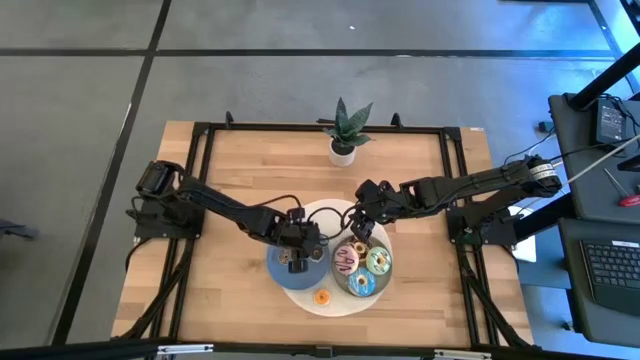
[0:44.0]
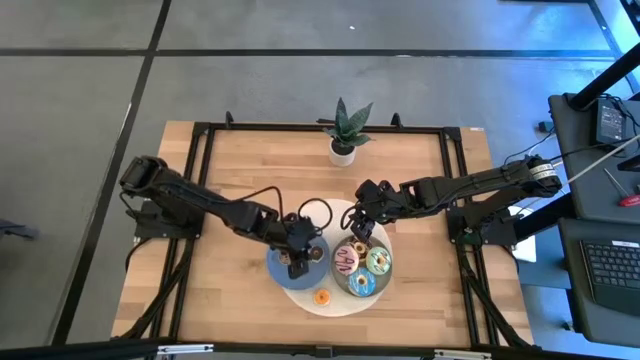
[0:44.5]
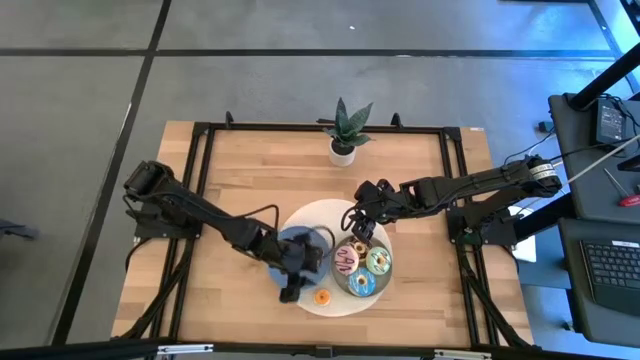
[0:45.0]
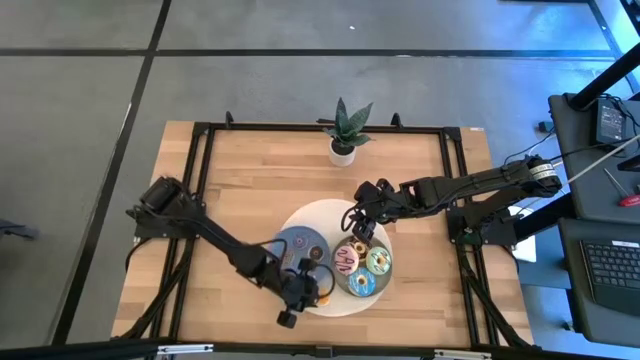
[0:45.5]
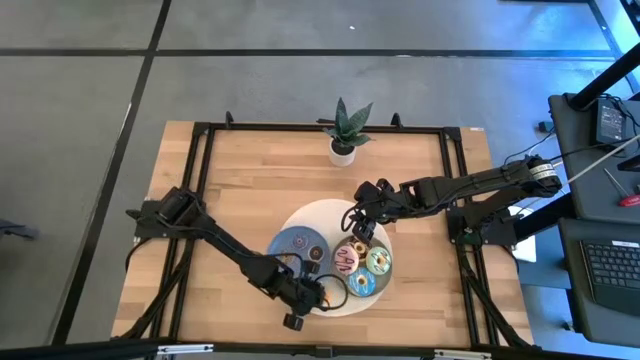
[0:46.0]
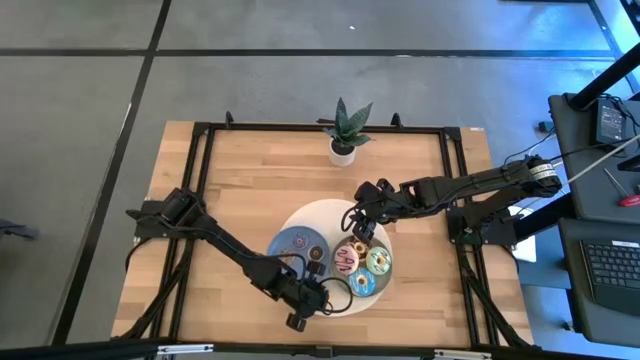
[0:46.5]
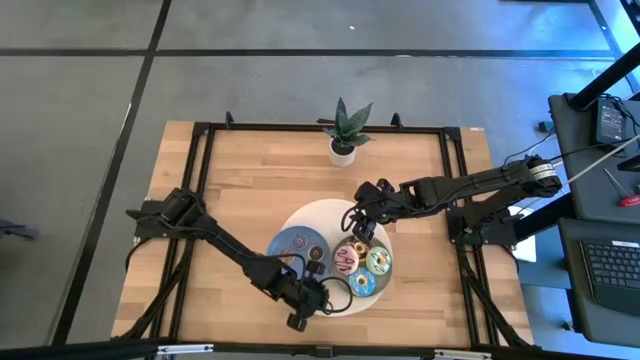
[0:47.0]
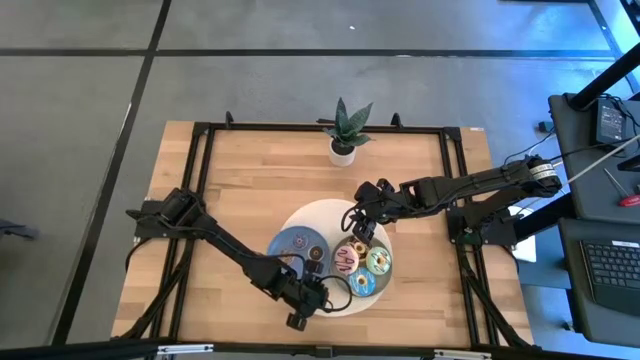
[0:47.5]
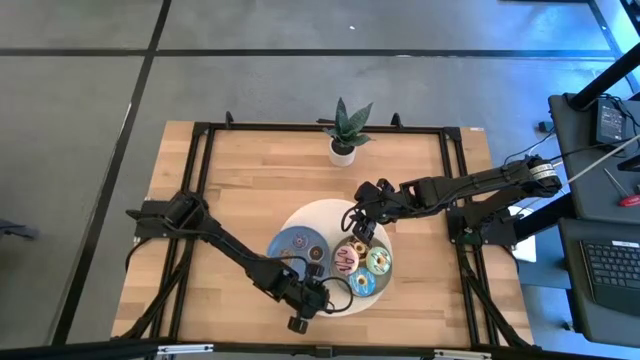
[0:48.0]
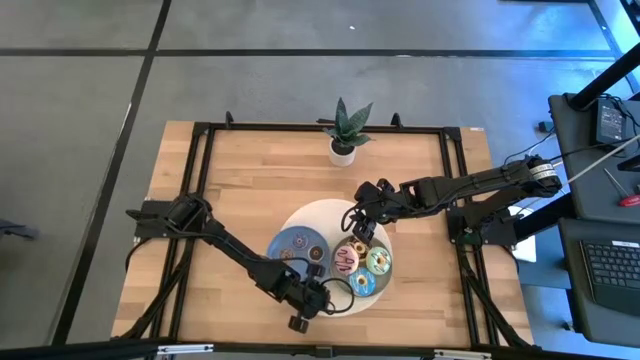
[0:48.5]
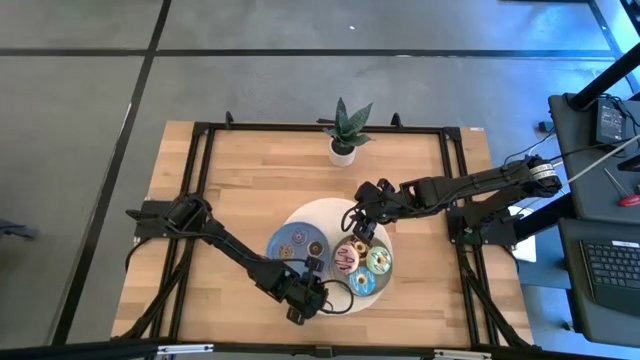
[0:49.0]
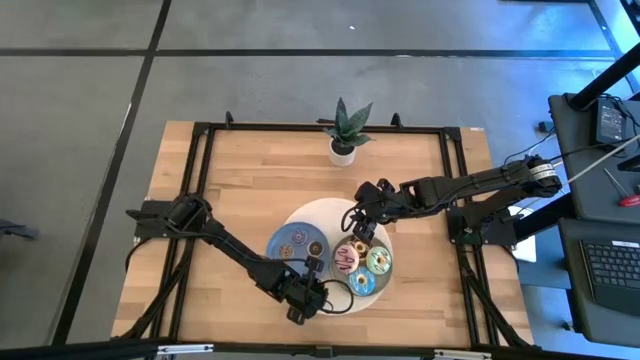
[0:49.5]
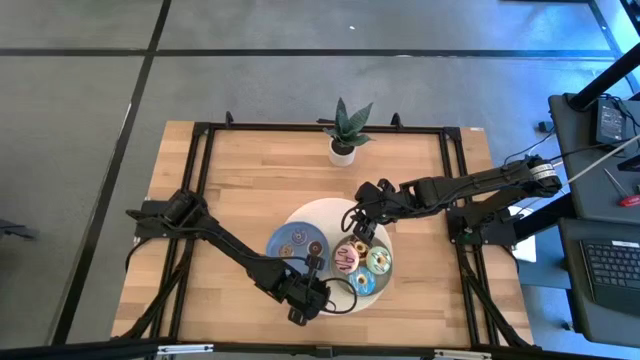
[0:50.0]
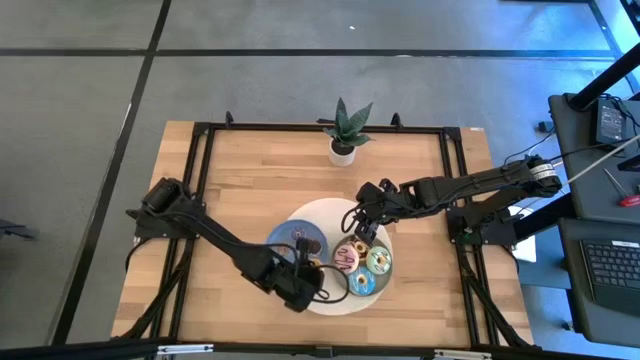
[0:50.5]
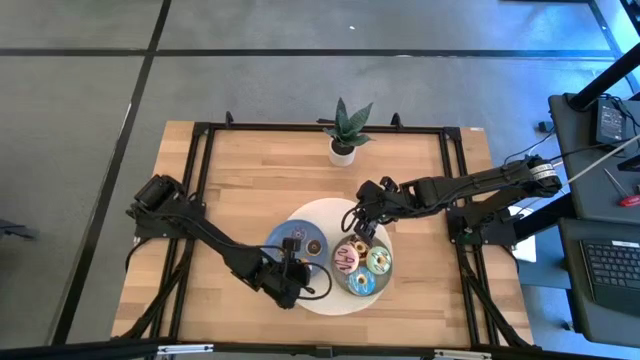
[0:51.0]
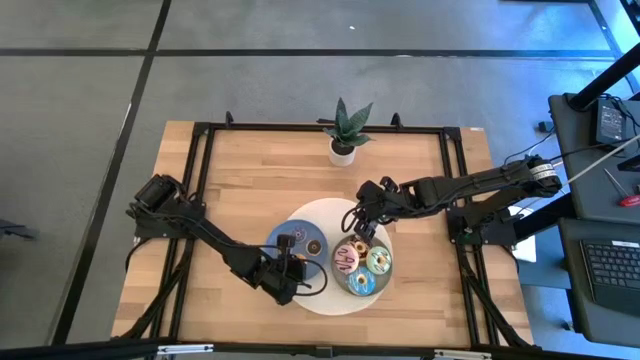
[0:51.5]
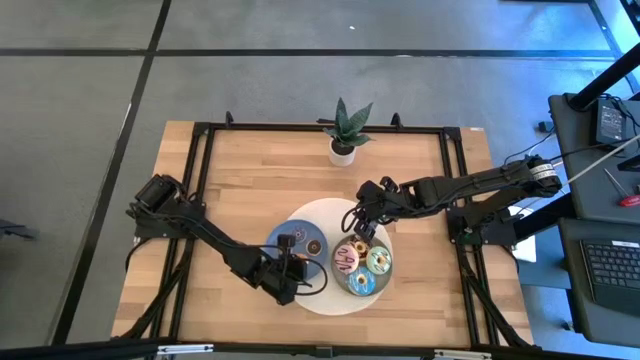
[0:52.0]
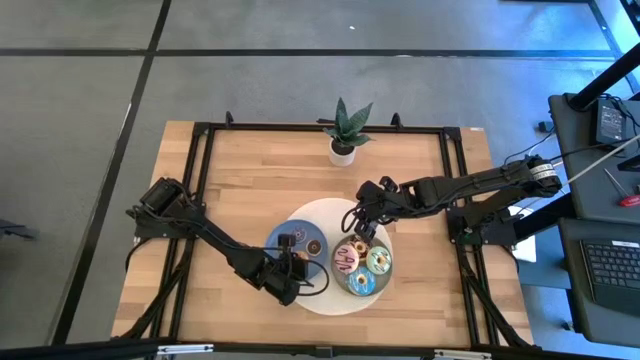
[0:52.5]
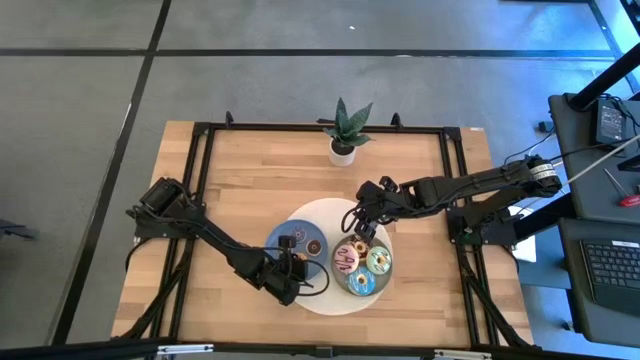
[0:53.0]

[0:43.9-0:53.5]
Task: Pick & Place donuts
Put the small orange donut on the blue plate

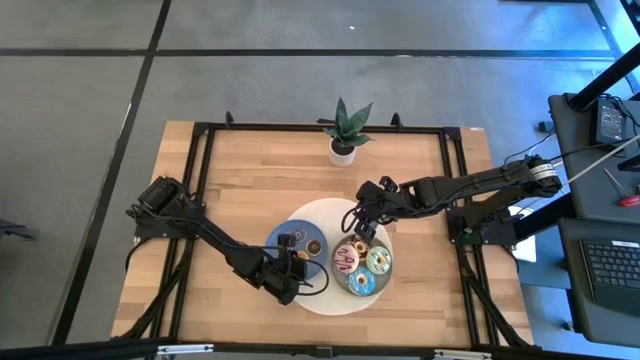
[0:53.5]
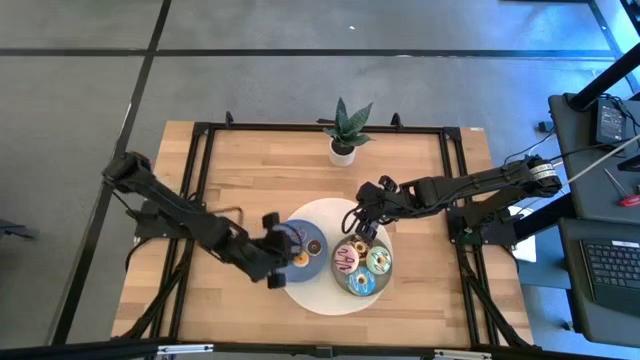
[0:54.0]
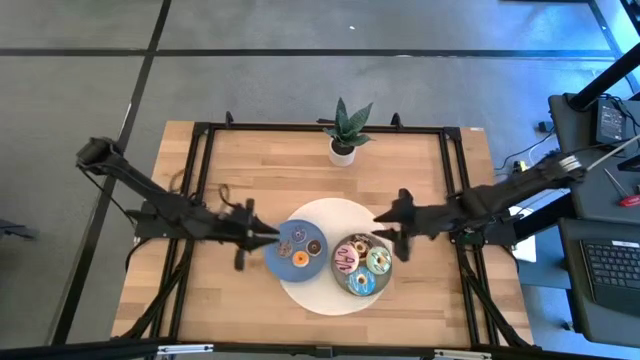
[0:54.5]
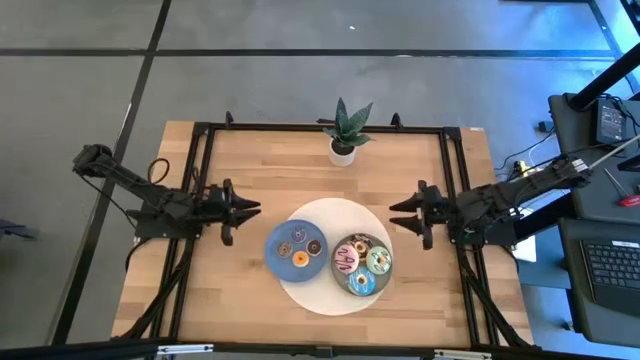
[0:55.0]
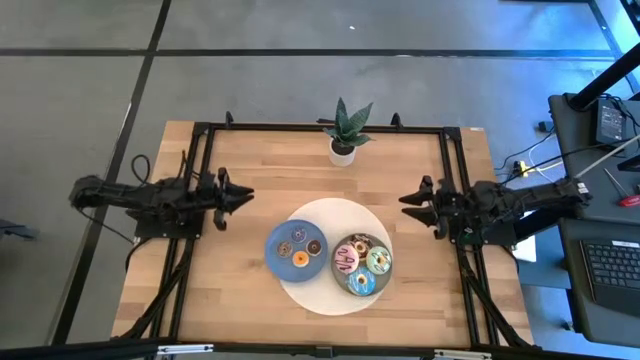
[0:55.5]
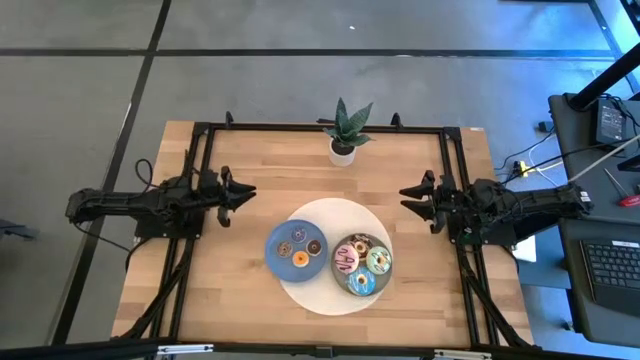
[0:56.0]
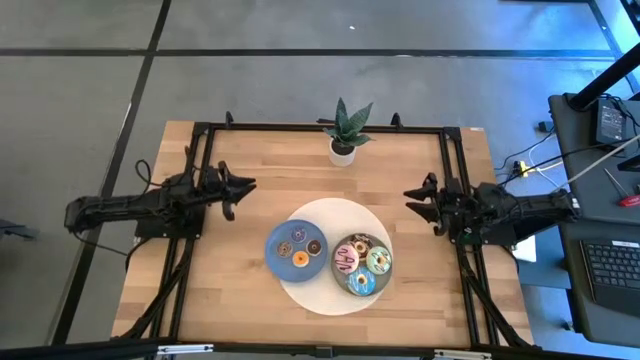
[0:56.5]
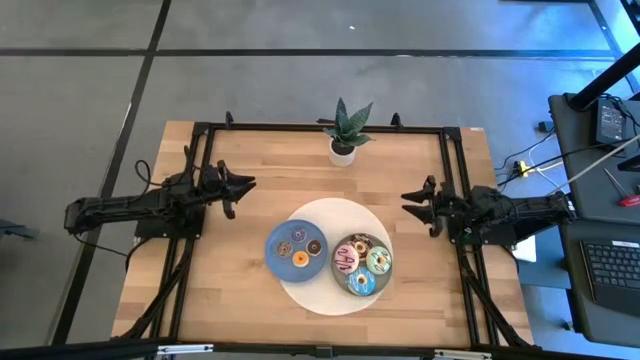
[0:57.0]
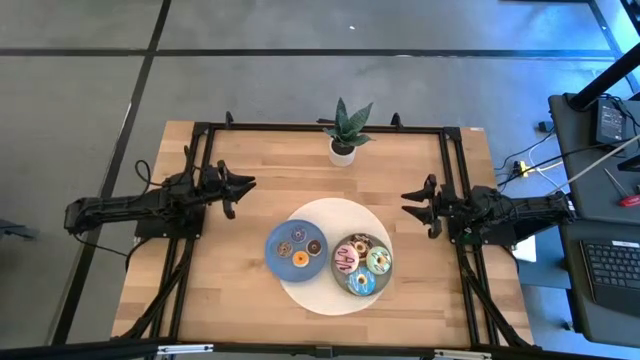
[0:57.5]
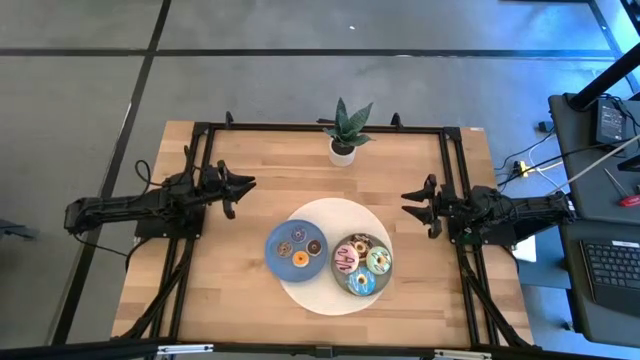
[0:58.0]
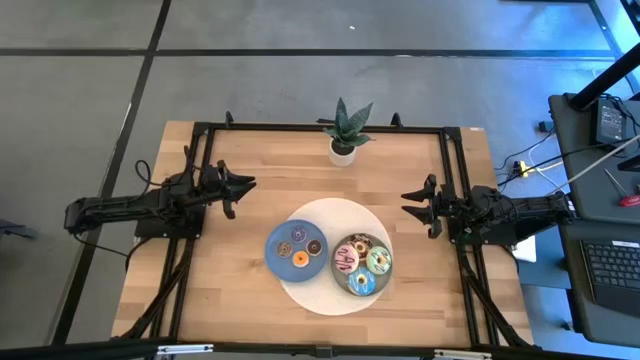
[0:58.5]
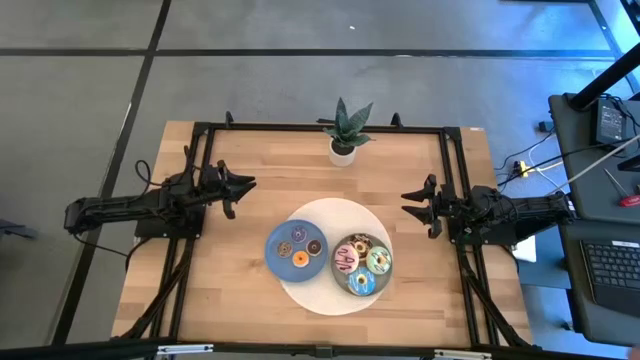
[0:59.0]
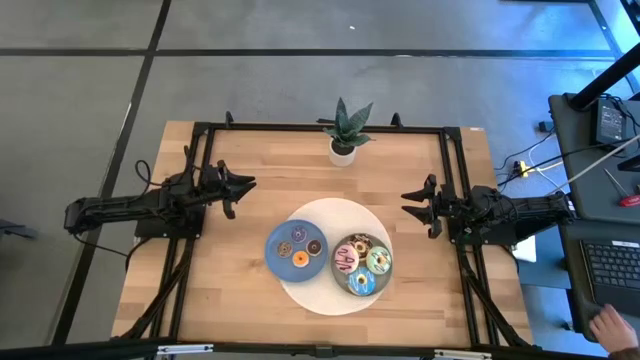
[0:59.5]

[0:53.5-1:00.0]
Return to Home Position

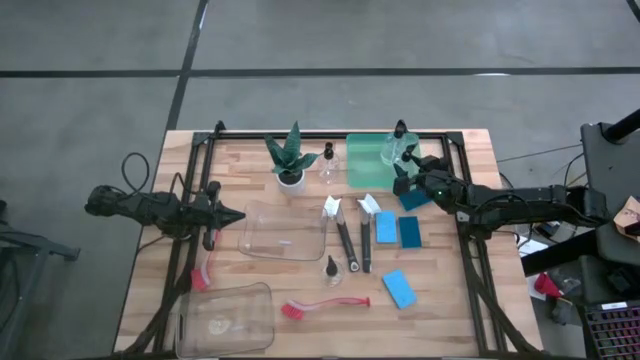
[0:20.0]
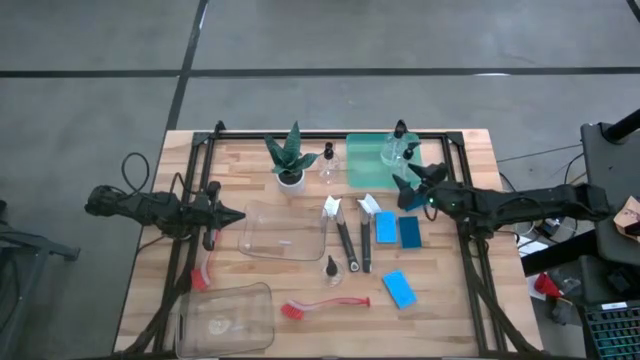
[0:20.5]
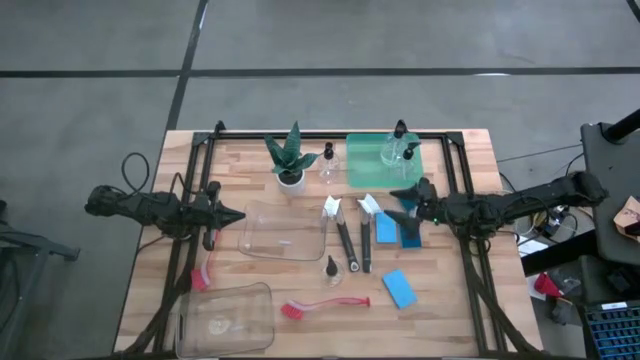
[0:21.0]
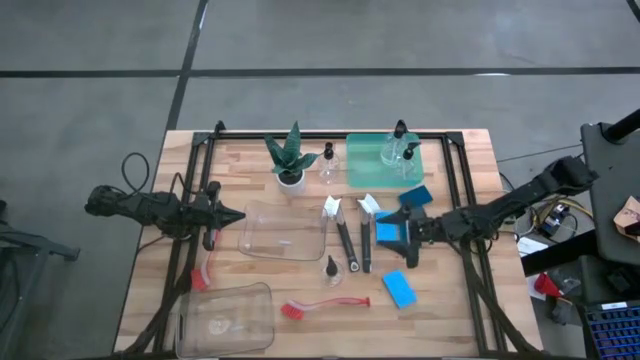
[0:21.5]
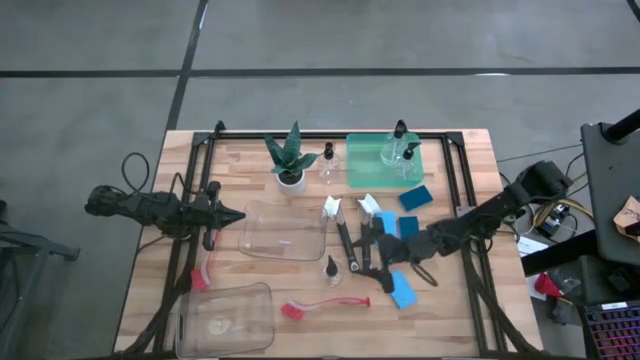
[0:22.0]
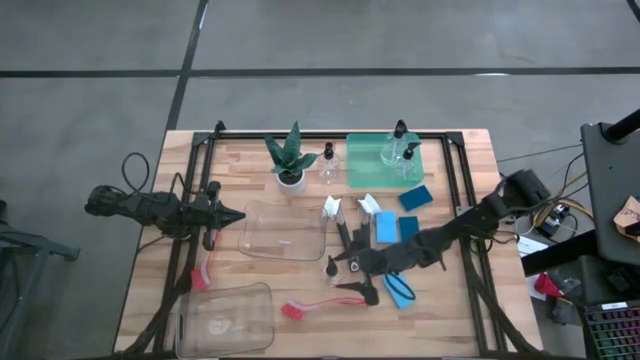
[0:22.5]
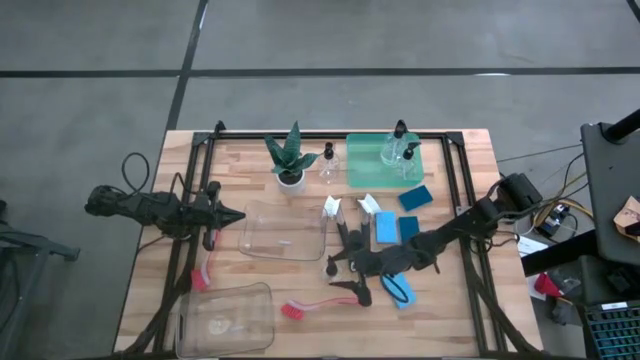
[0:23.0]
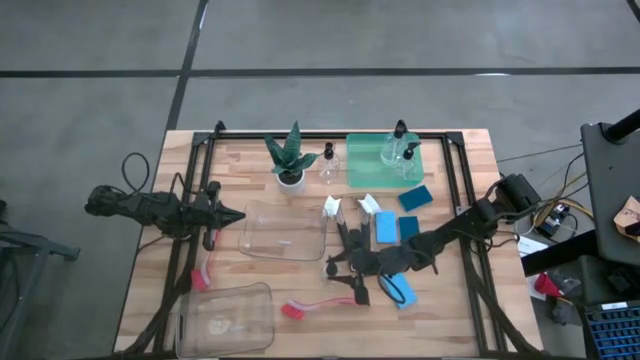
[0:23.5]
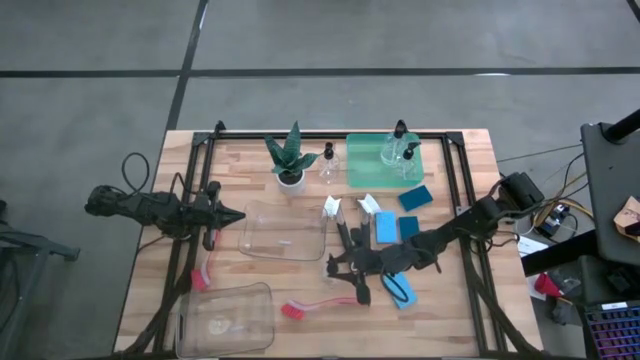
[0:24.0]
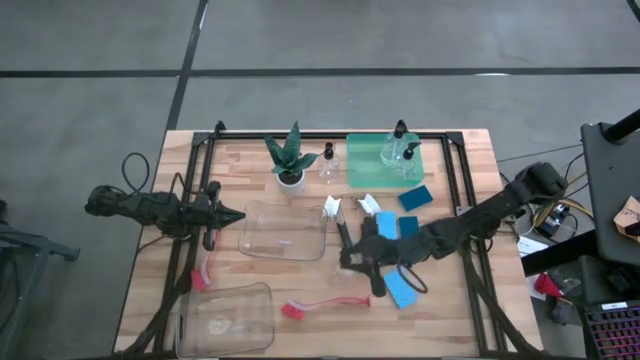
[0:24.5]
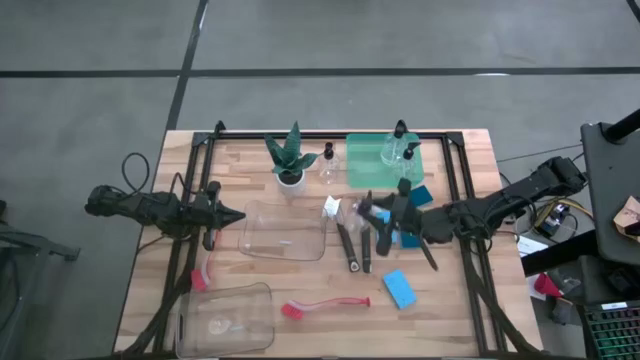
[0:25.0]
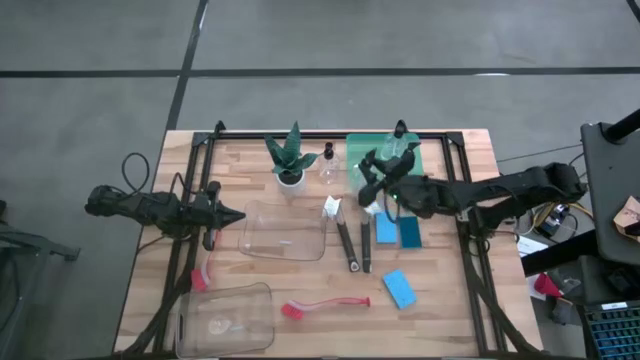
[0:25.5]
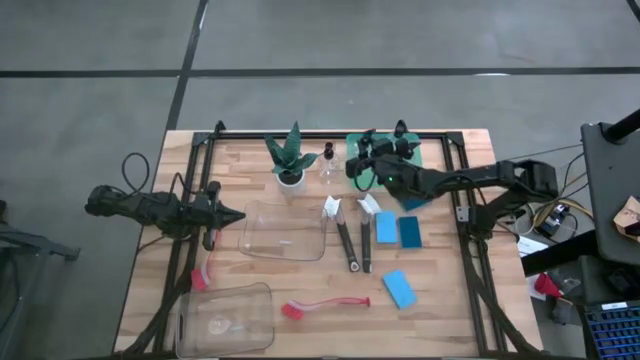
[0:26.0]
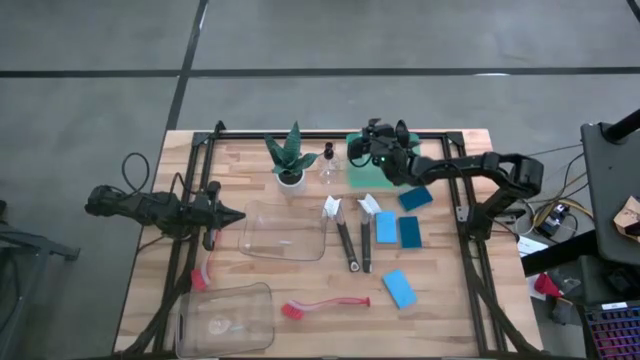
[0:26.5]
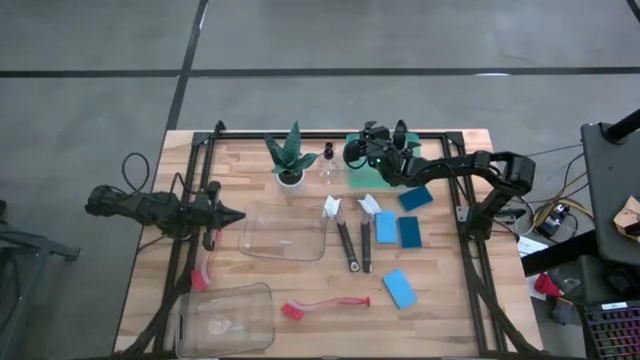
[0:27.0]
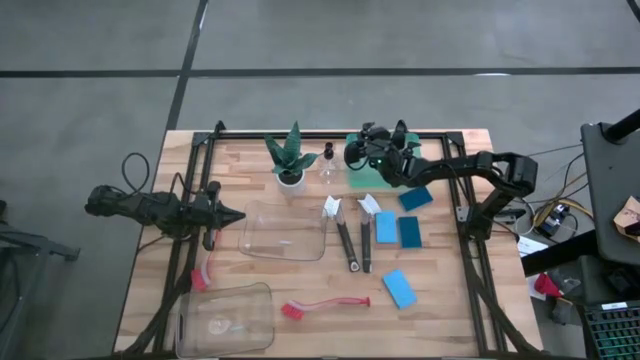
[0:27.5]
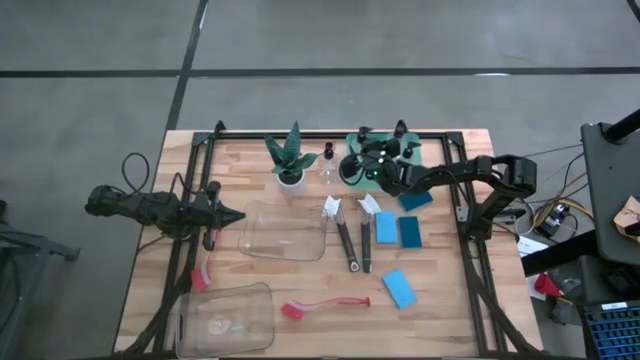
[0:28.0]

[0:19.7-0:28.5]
Task: Pick & Place Kitchen Sink Supplies
Put the transparent soap dispenser into the blue bin
